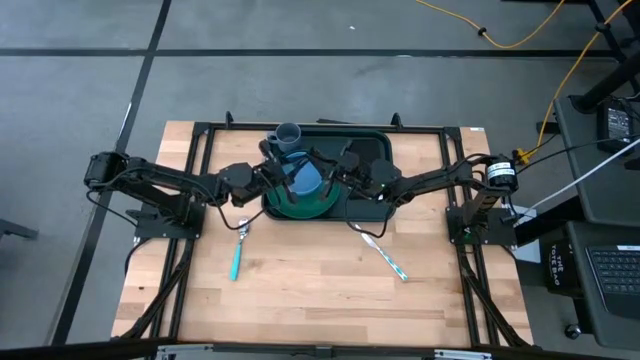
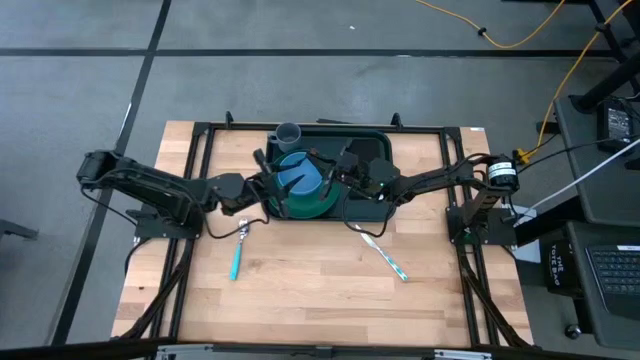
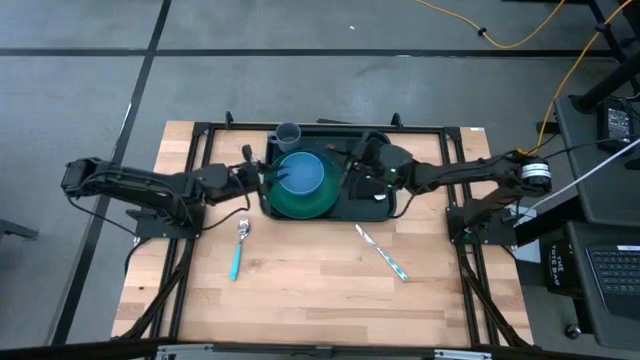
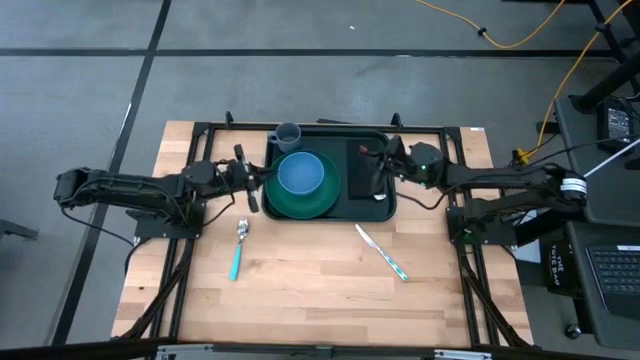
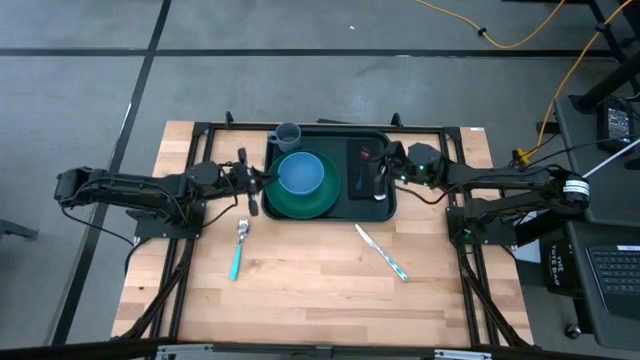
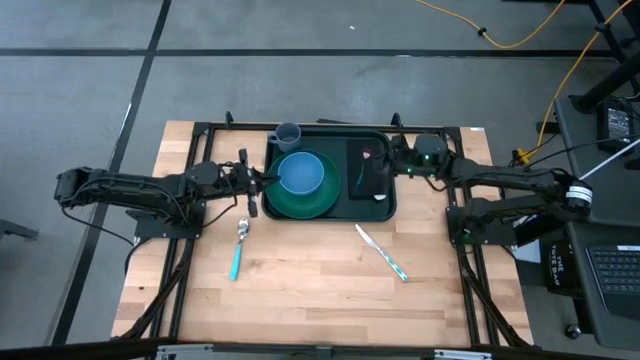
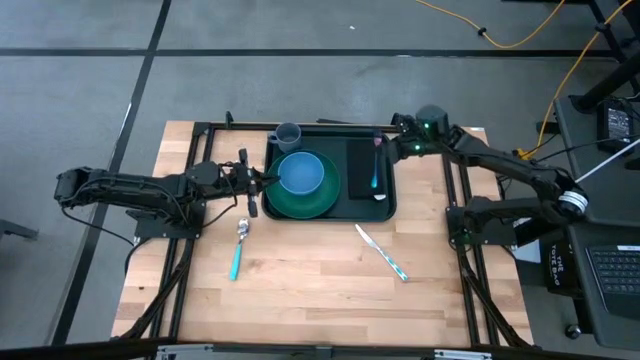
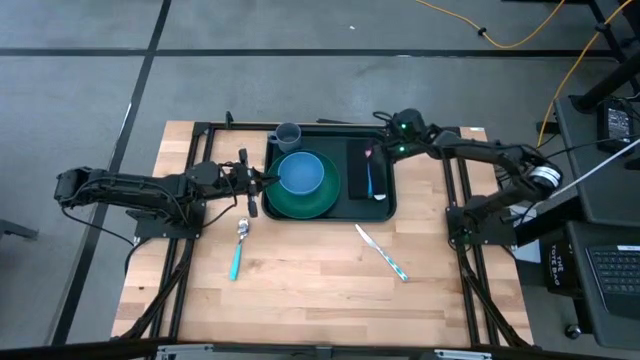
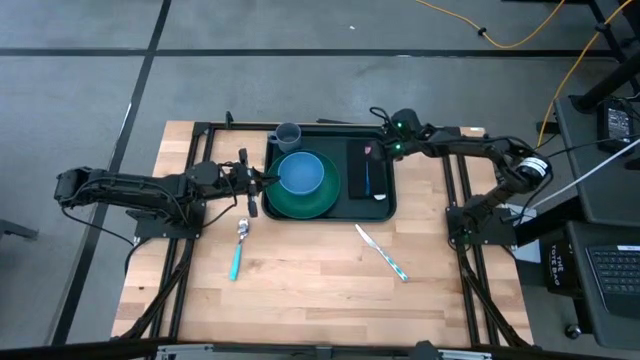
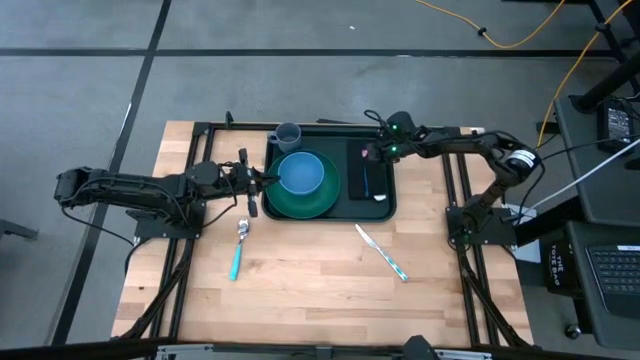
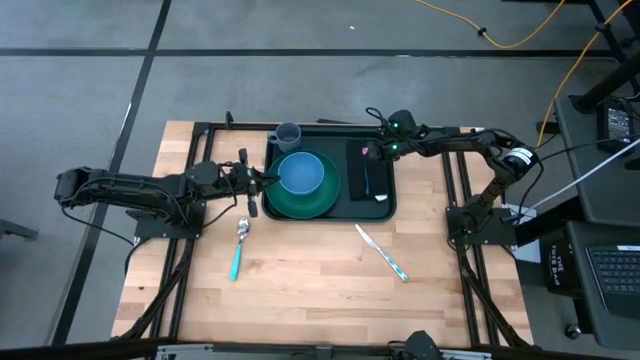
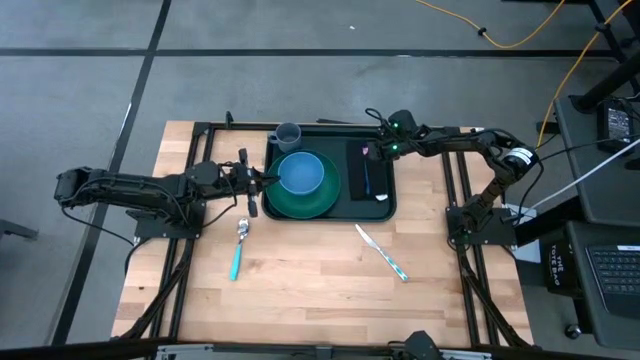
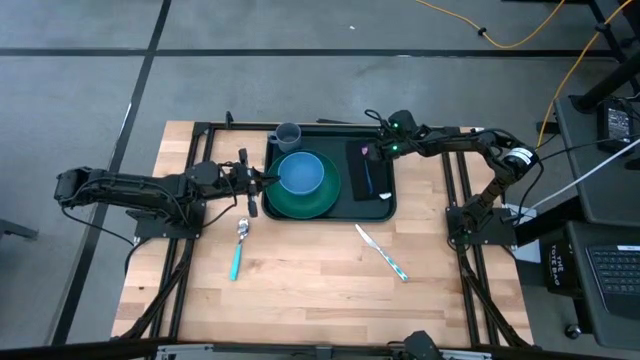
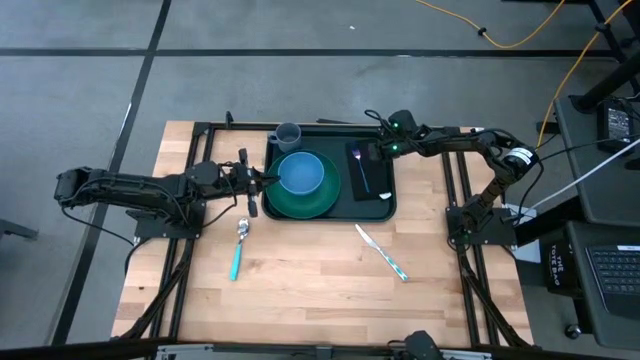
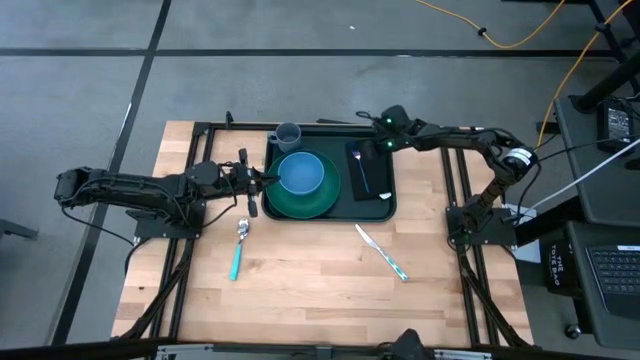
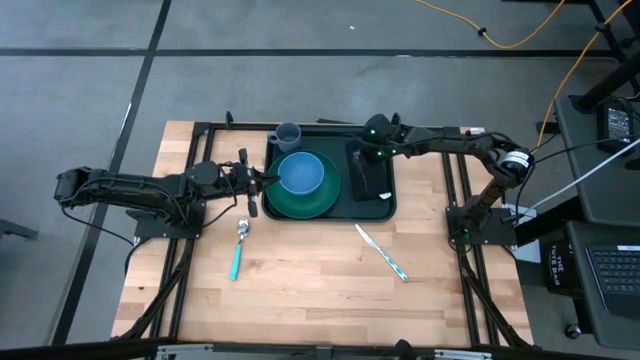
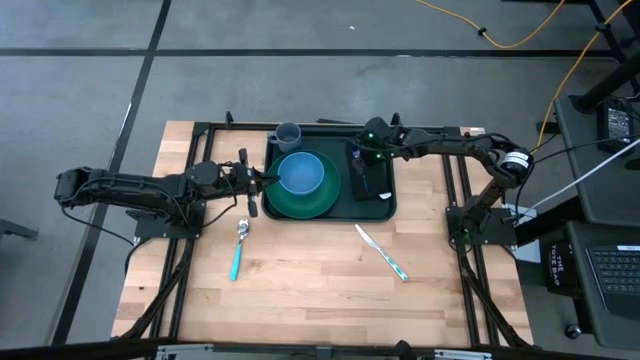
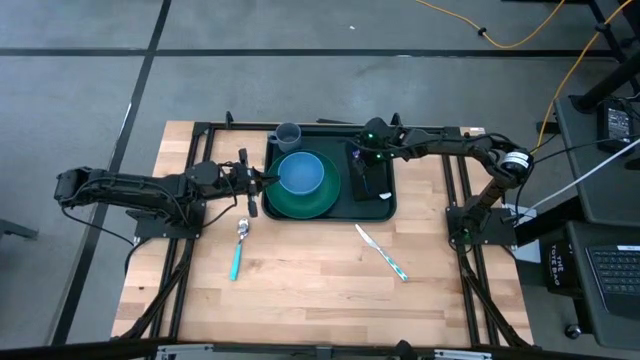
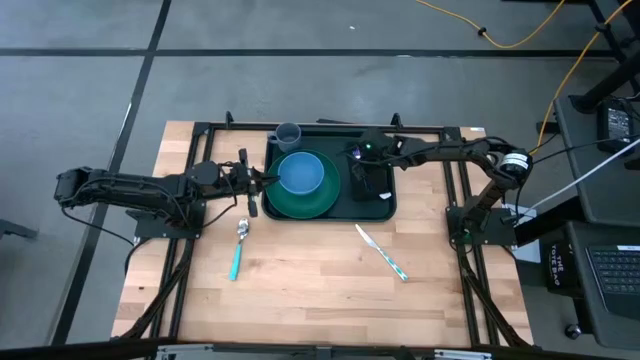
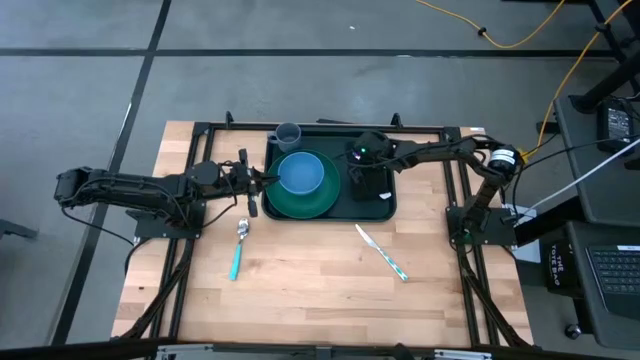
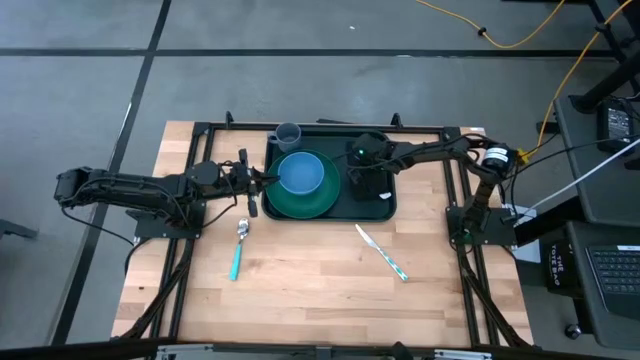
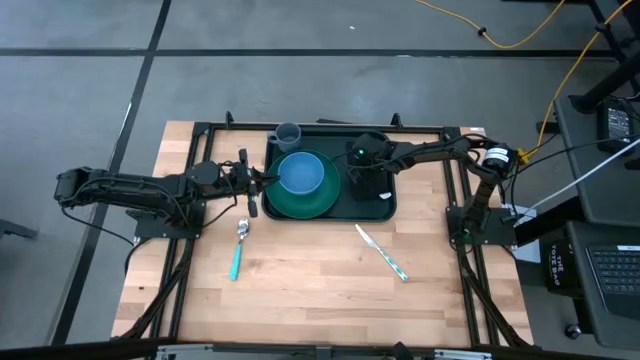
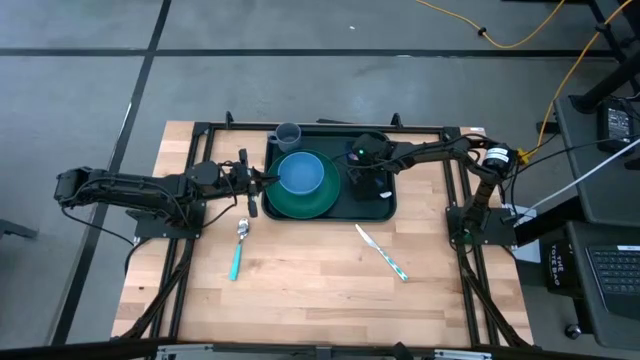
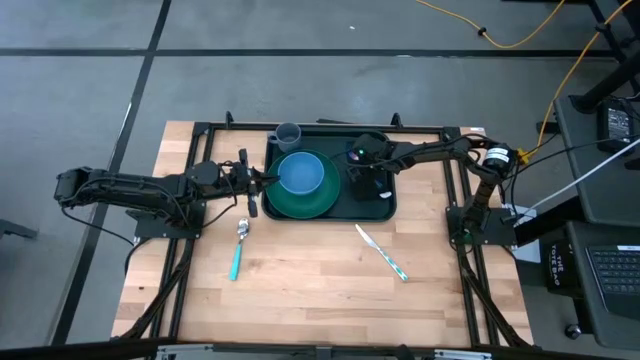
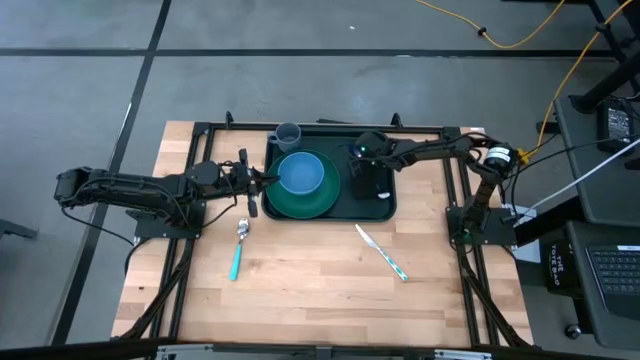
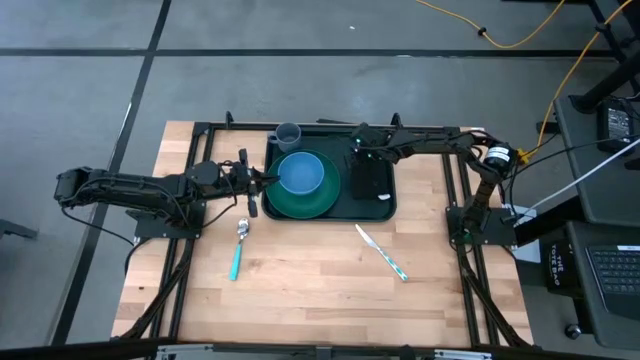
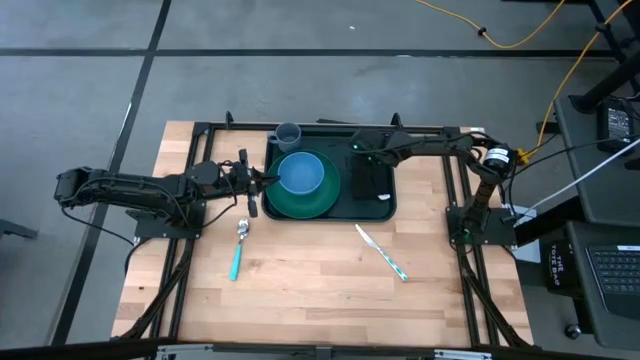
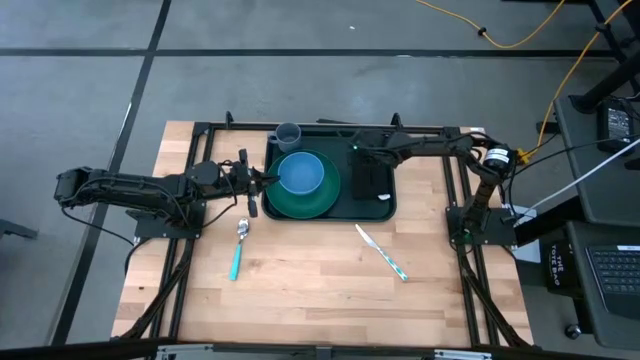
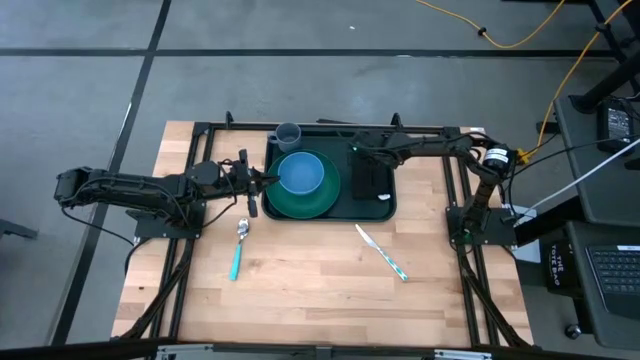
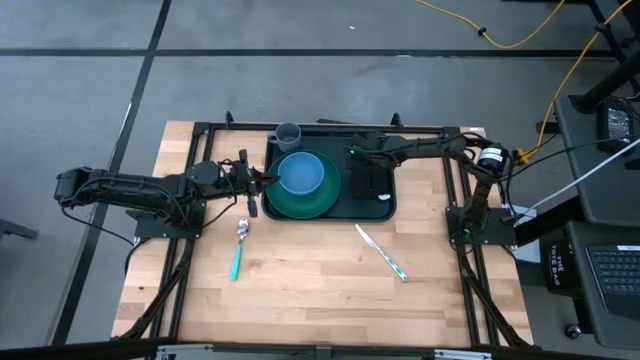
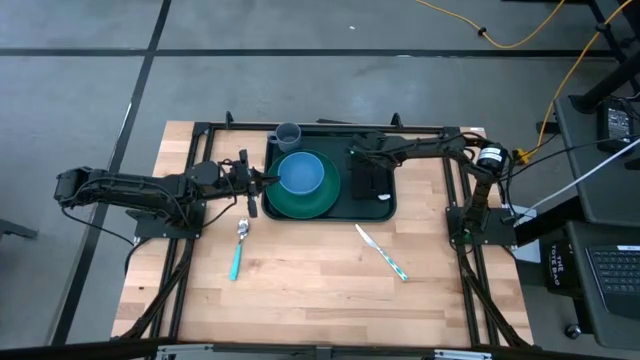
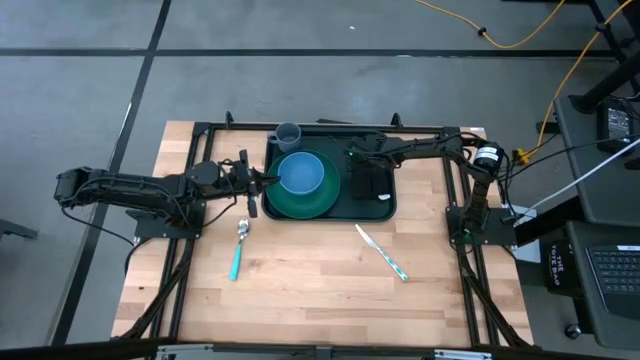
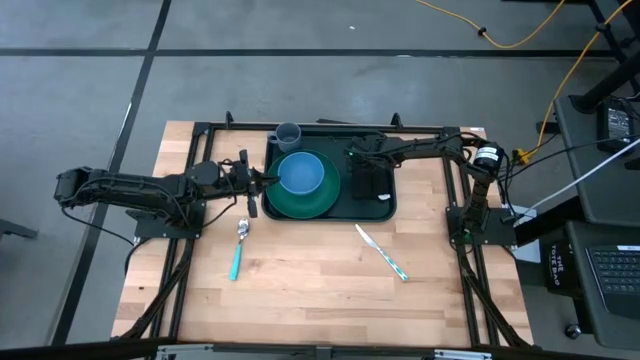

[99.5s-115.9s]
Task: Set up tray
Put the blue fork on the black table napkin

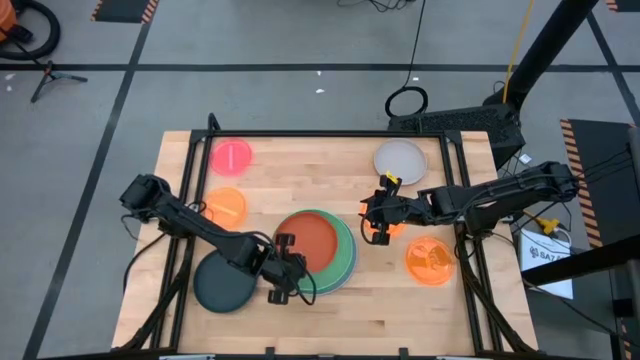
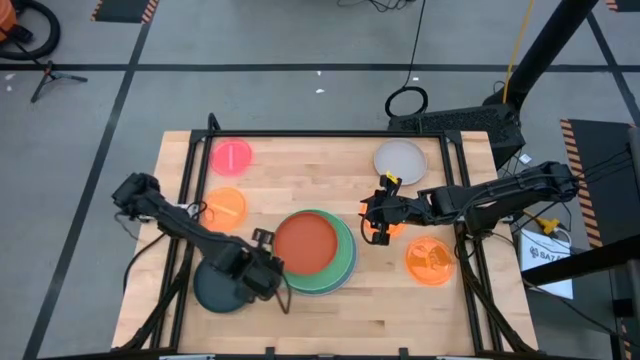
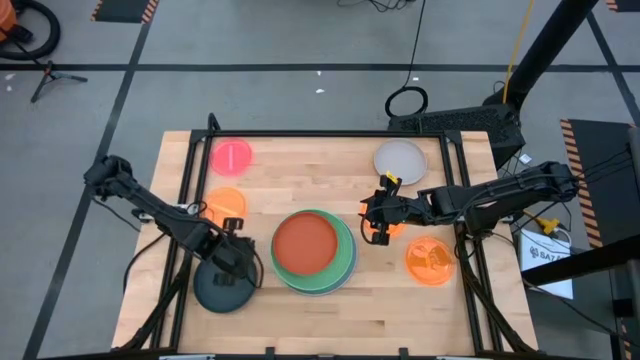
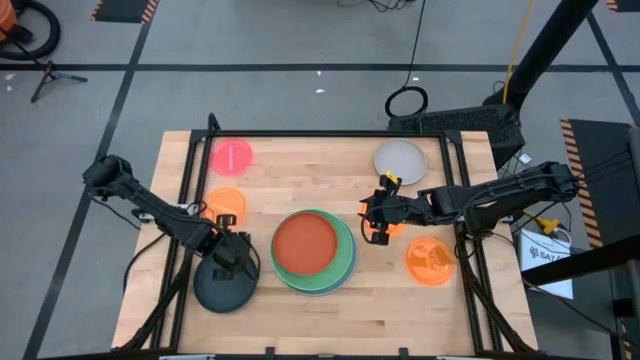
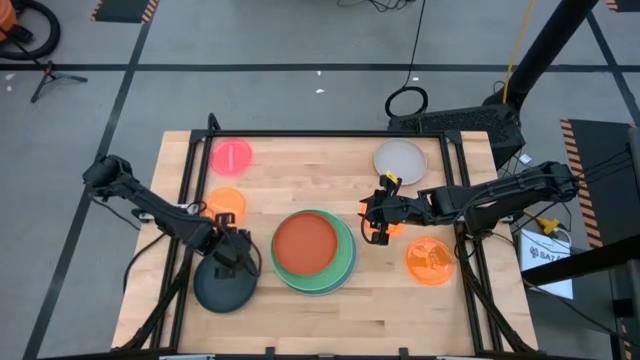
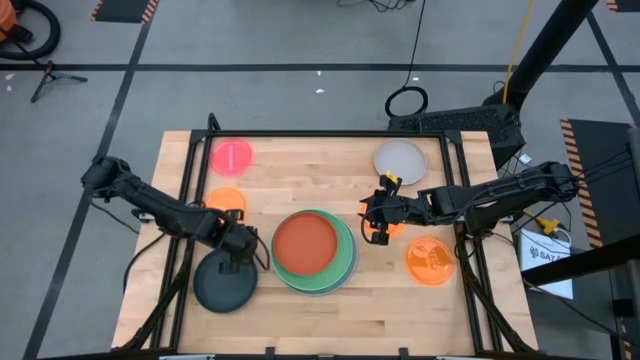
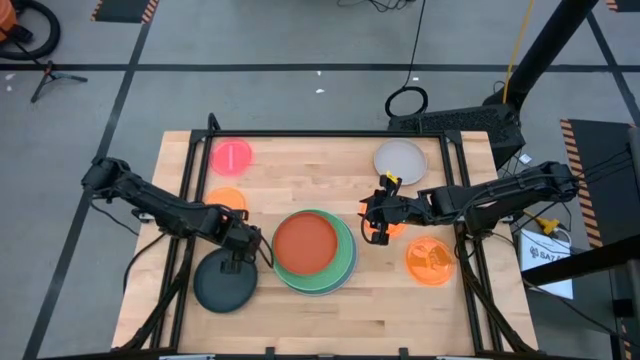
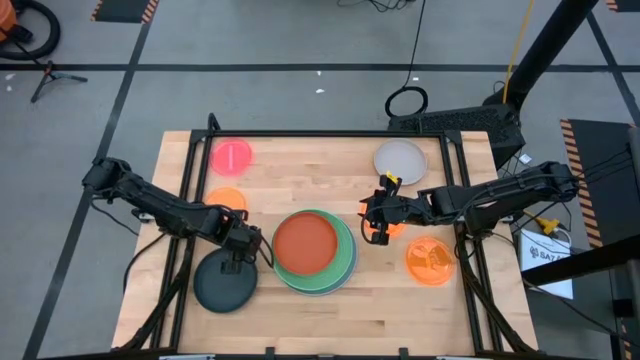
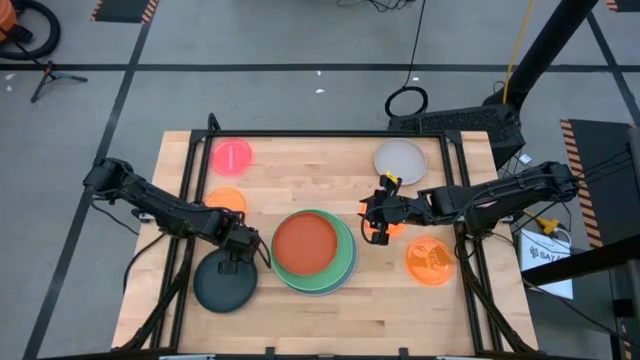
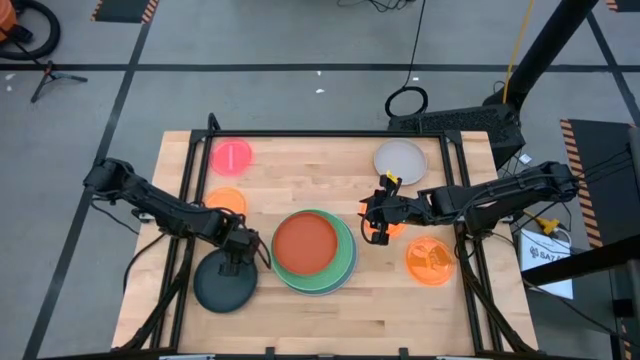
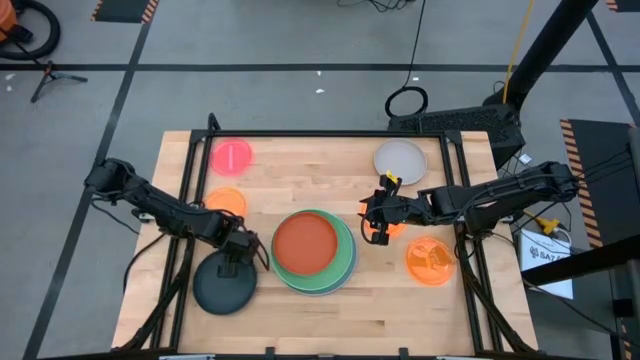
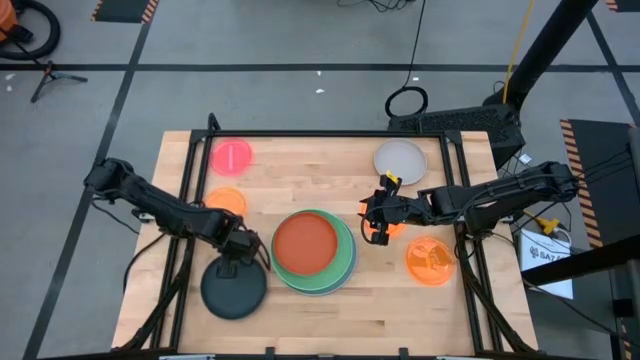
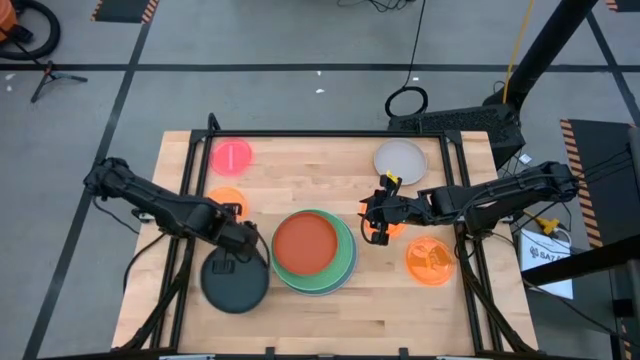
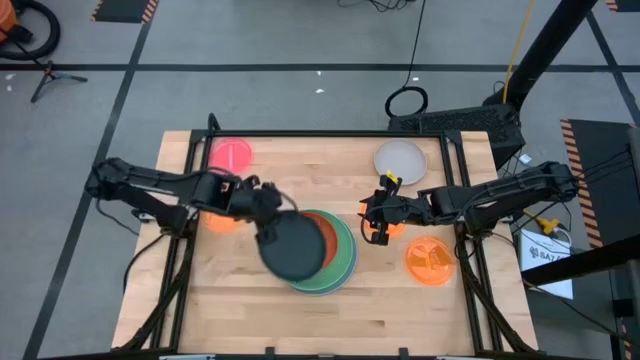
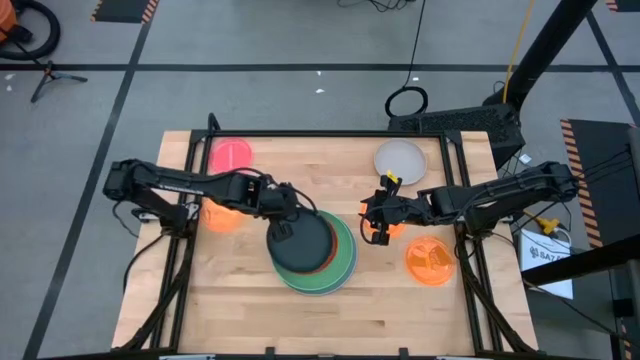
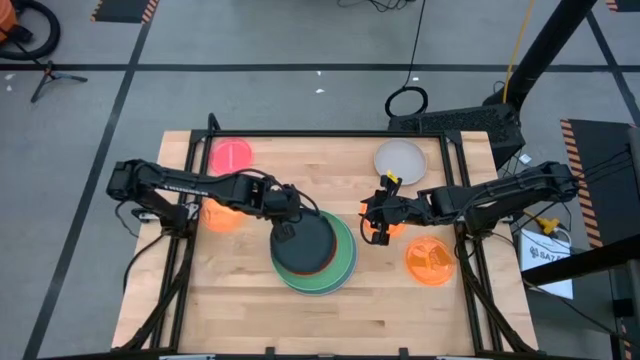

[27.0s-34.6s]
Task: Stack plastic plates
Stack the black plate on the brown plate
